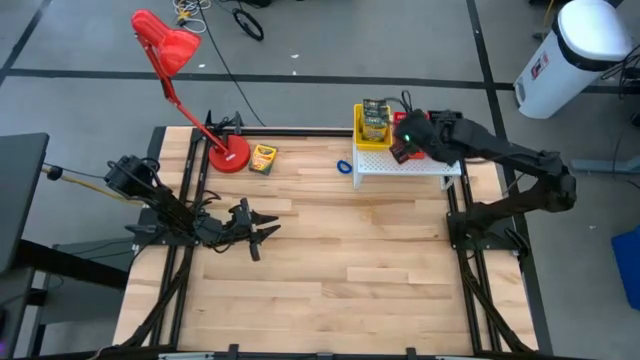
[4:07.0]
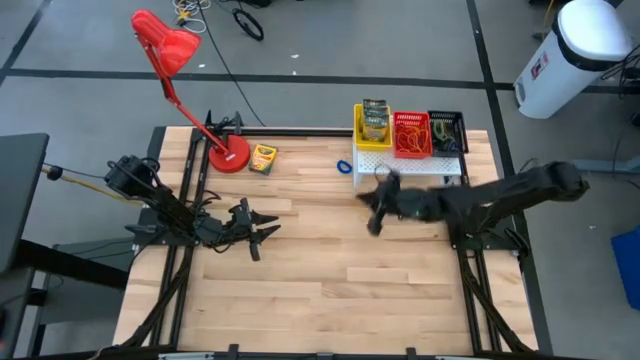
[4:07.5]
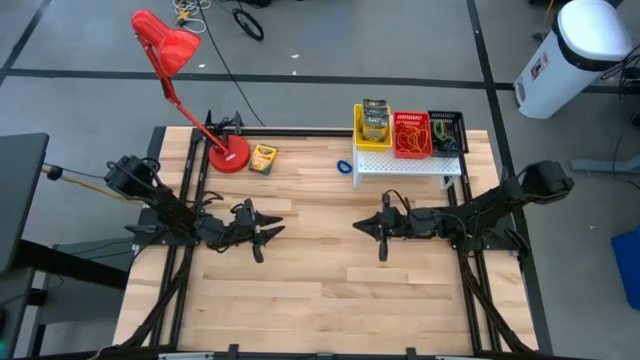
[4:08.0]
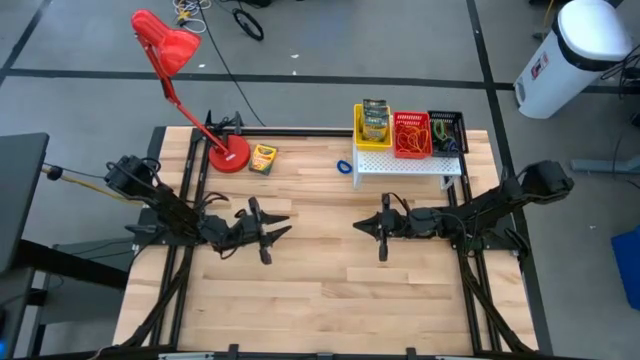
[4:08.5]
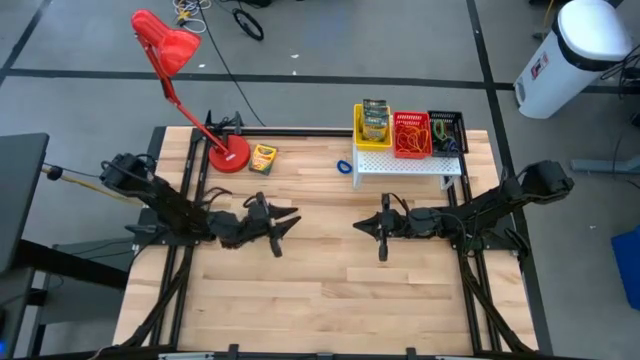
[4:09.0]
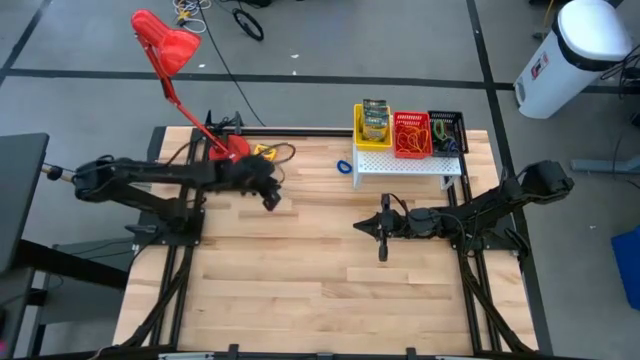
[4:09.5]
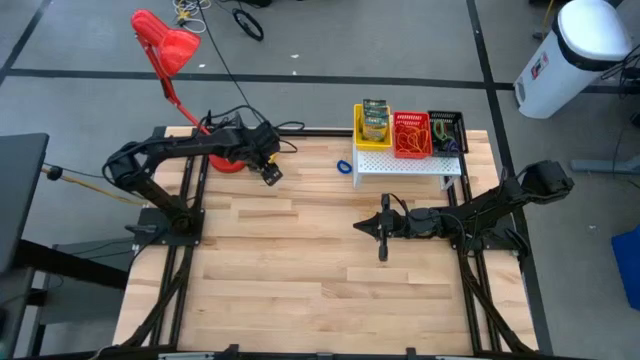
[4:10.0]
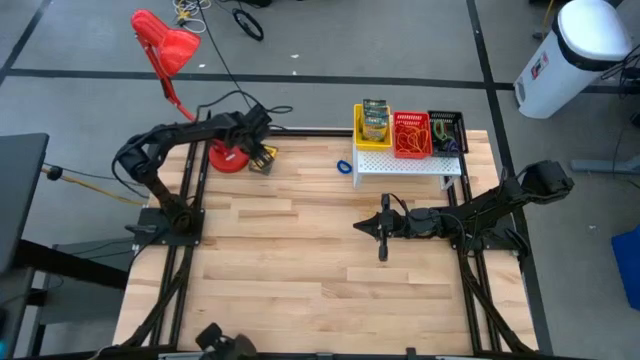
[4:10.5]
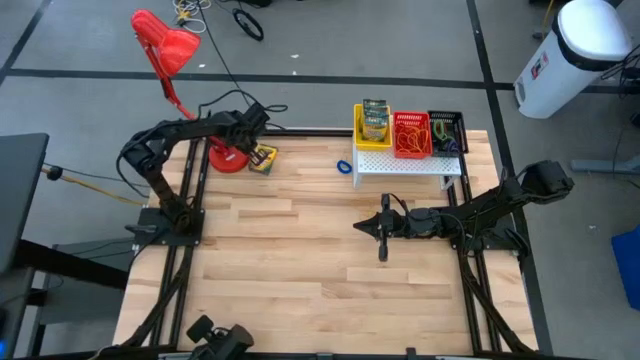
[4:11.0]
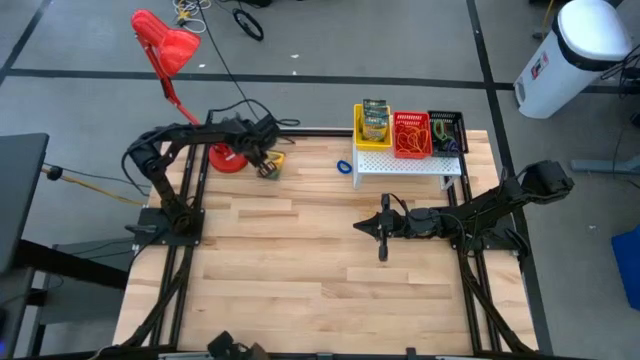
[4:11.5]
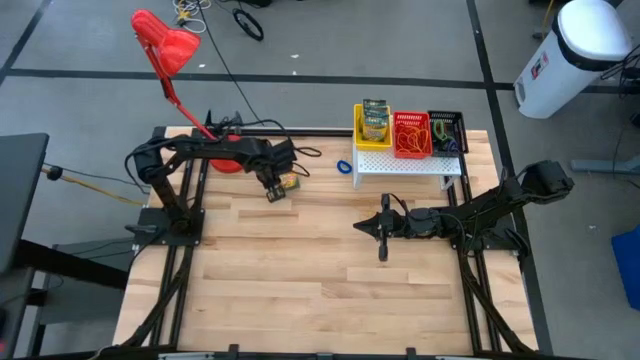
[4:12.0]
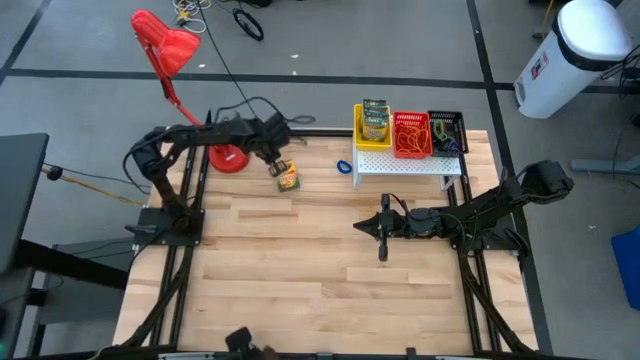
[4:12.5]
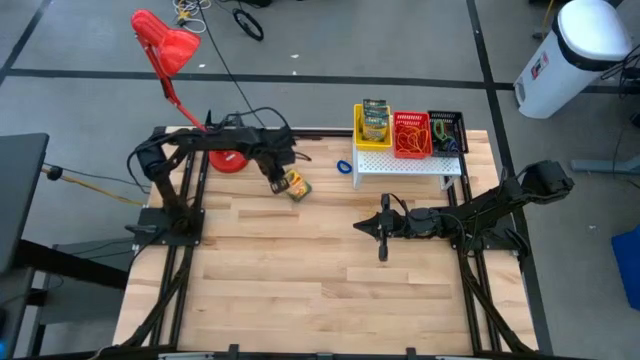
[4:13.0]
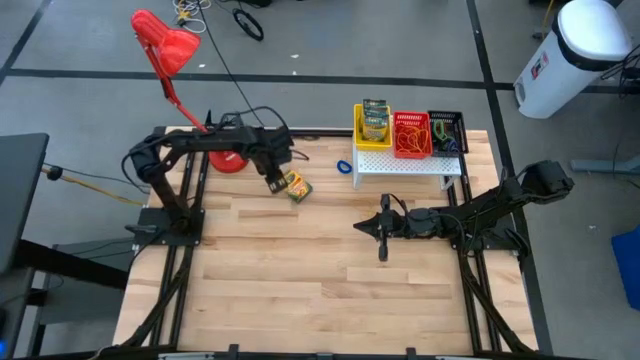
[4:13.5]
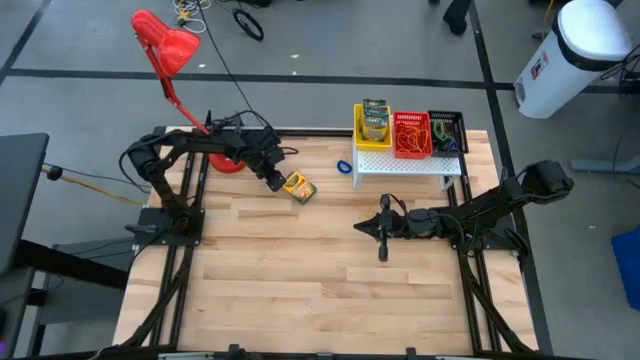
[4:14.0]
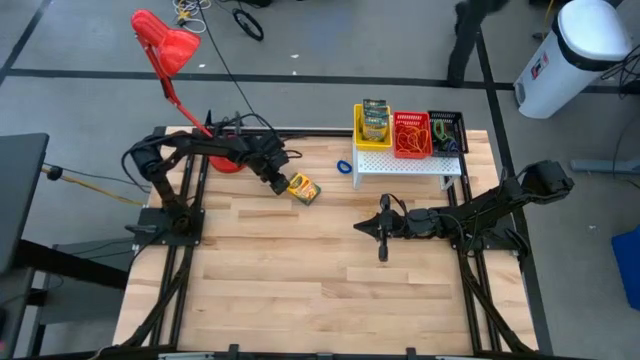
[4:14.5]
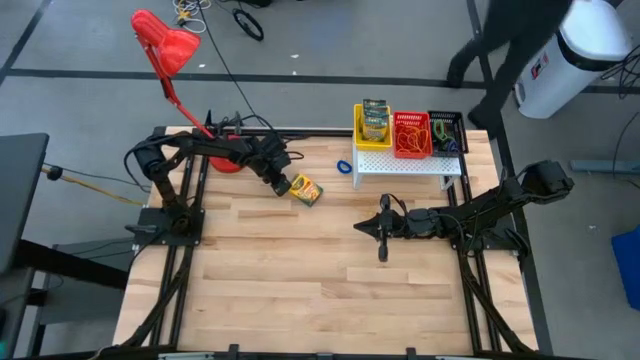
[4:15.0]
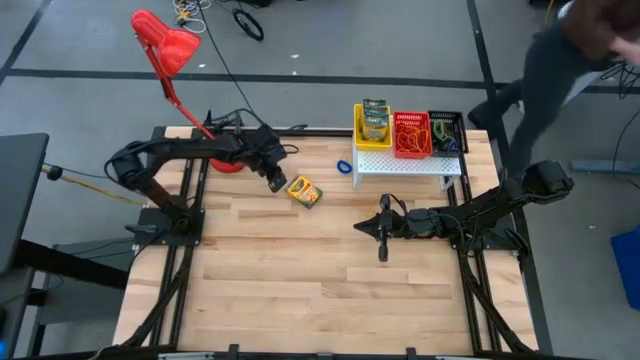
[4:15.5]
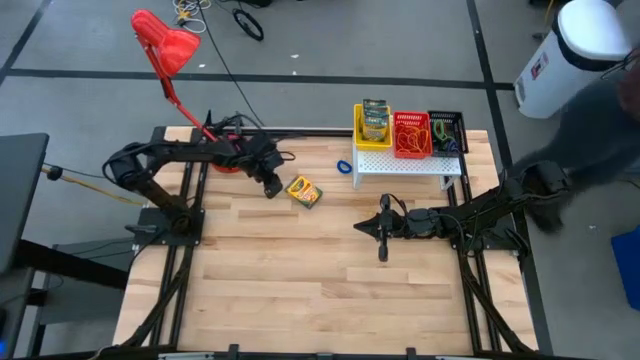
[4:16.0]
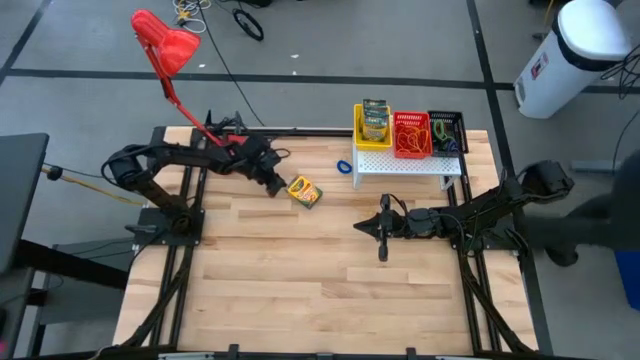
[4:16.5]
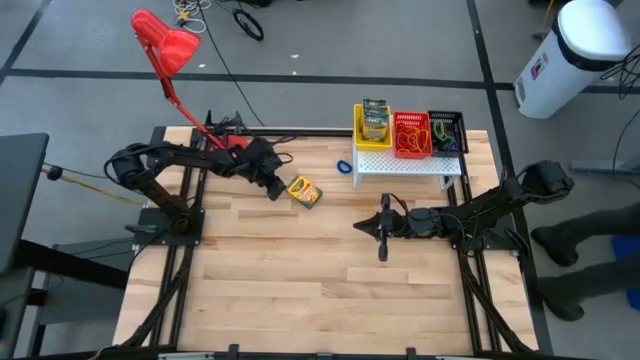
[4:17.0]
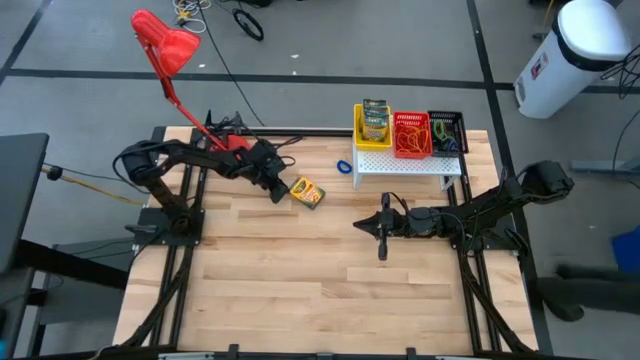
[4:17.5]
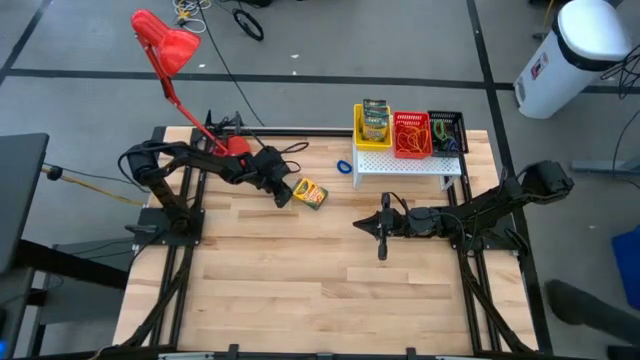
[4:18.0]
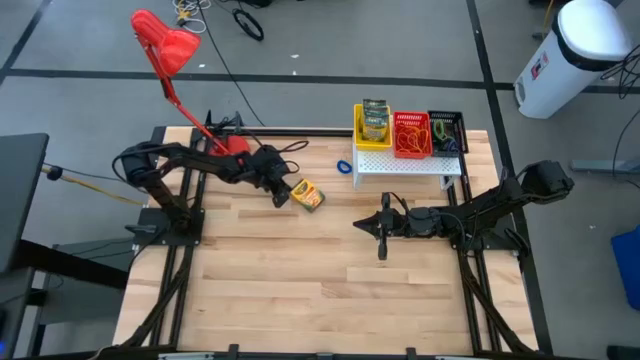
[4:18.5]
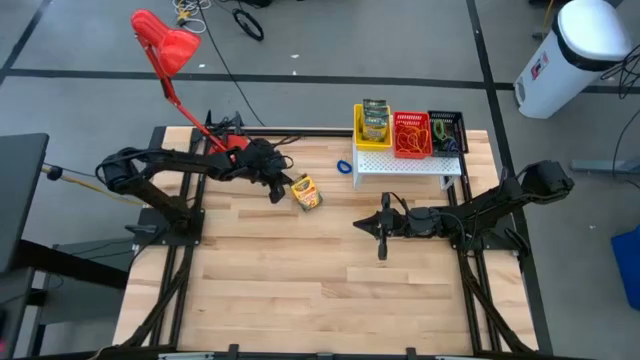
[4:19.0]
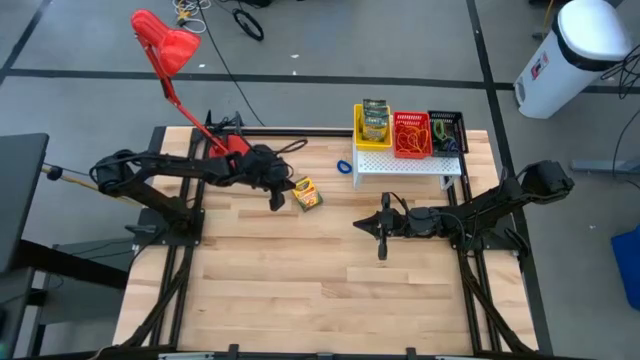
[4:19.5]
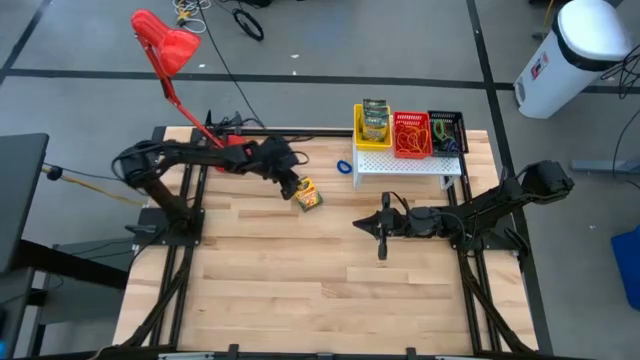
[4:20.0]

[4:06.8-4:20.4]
Task: Pick & Place Office Desk Supplies
Put the yellow crayon box on the yellow basket

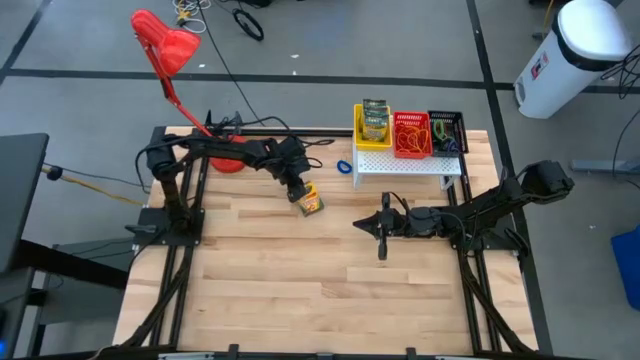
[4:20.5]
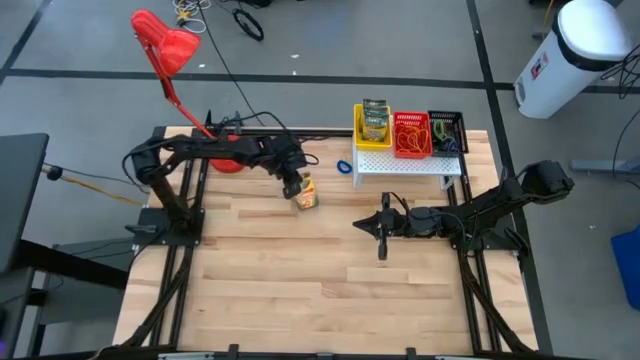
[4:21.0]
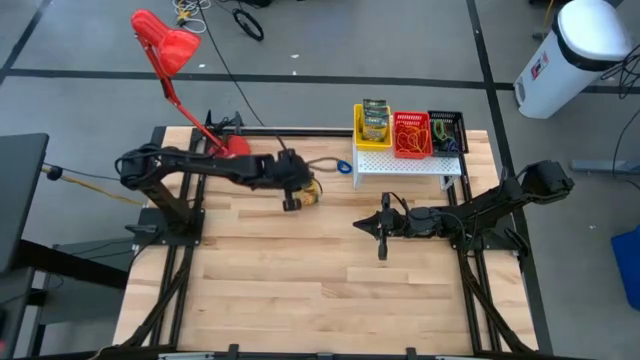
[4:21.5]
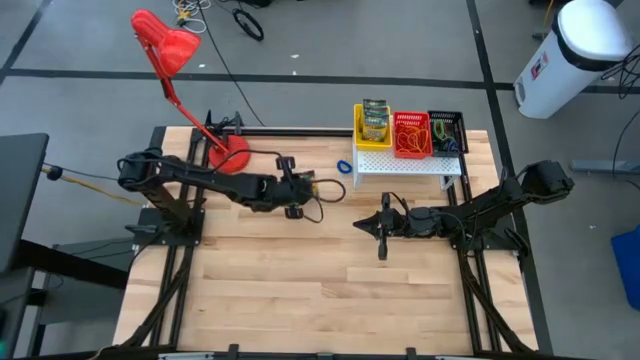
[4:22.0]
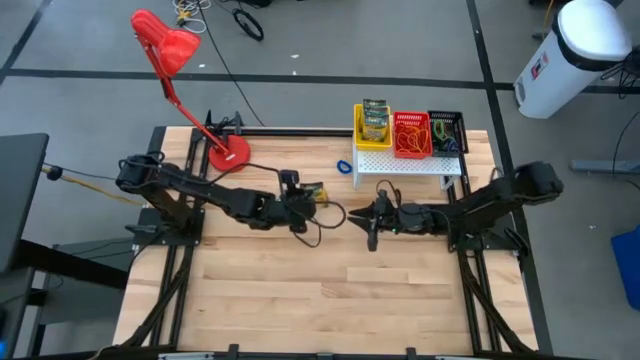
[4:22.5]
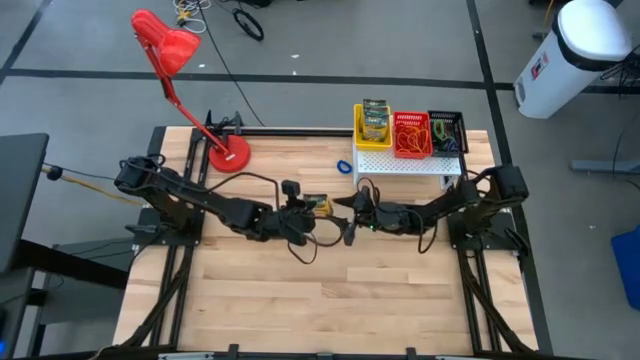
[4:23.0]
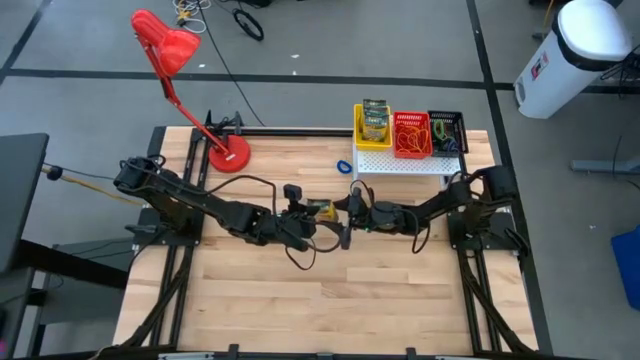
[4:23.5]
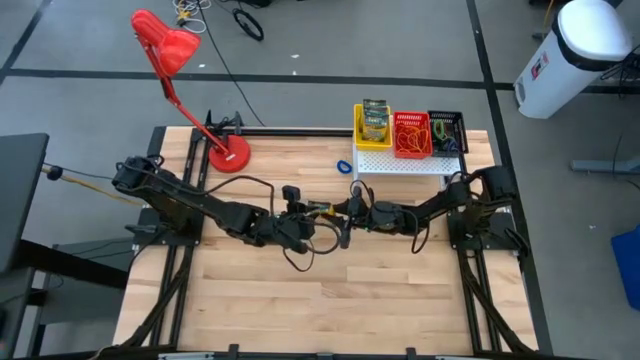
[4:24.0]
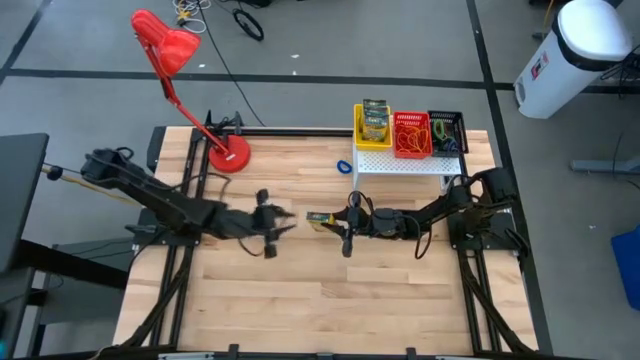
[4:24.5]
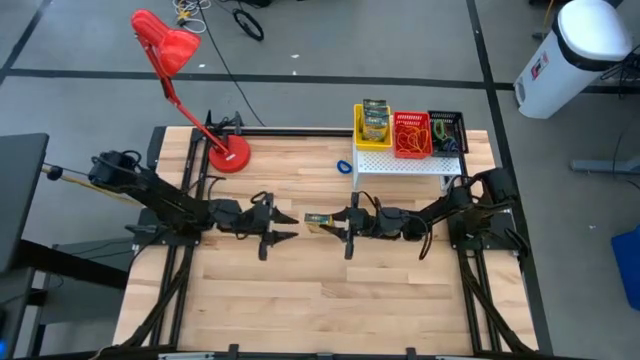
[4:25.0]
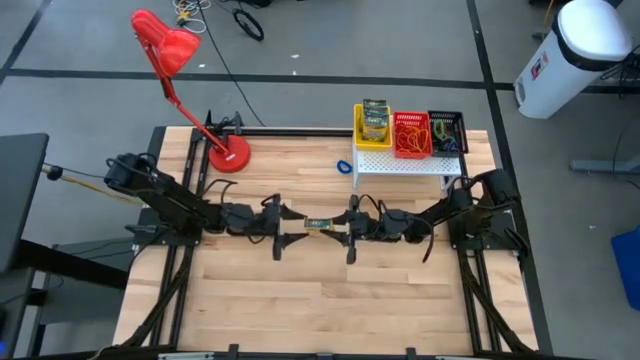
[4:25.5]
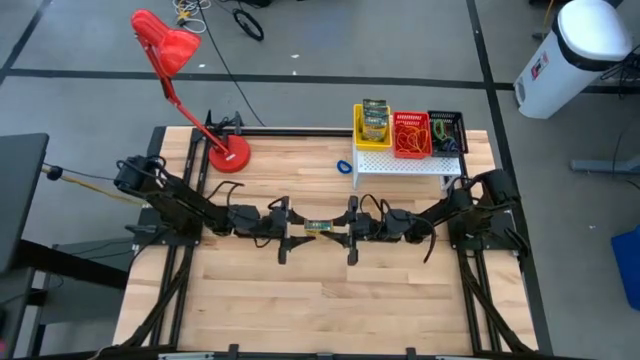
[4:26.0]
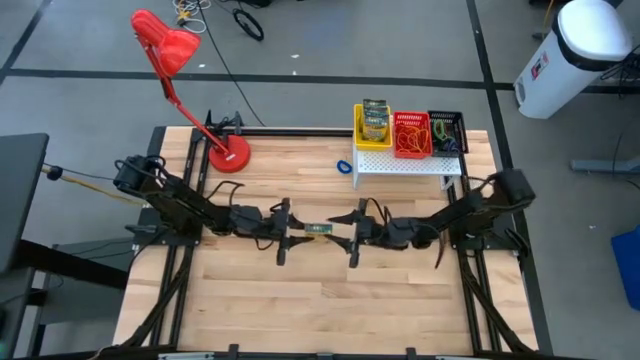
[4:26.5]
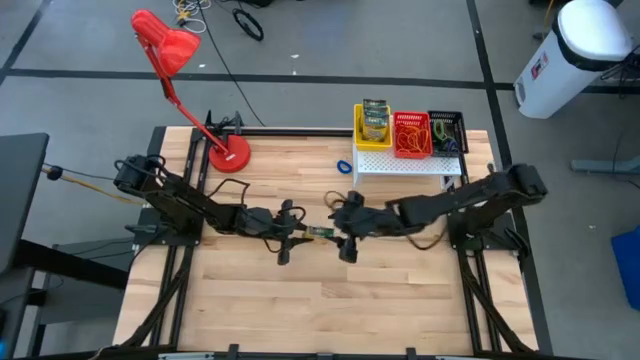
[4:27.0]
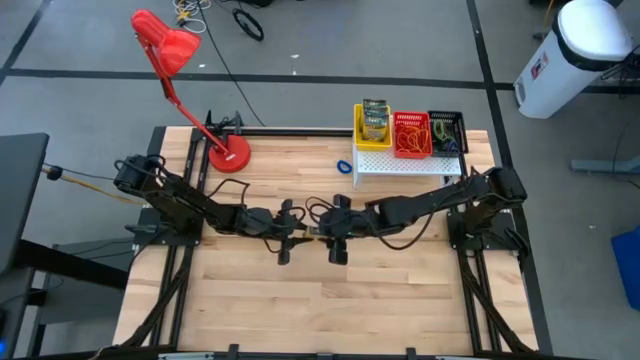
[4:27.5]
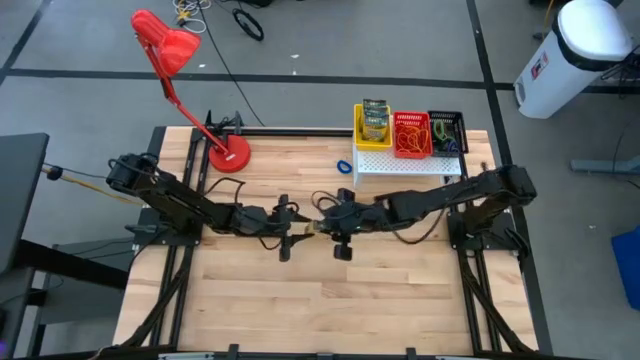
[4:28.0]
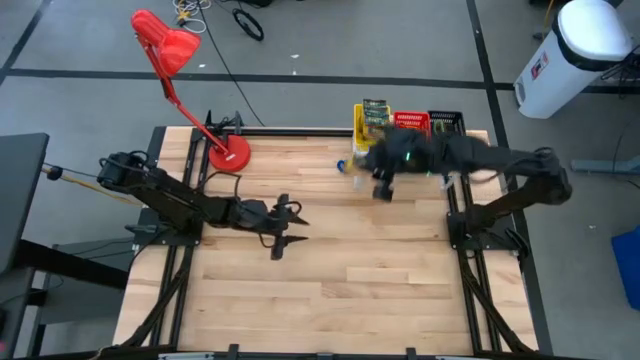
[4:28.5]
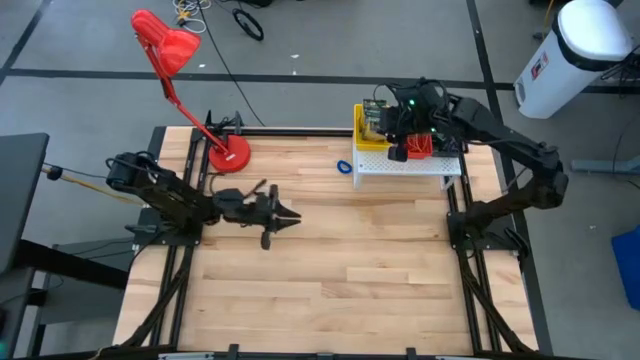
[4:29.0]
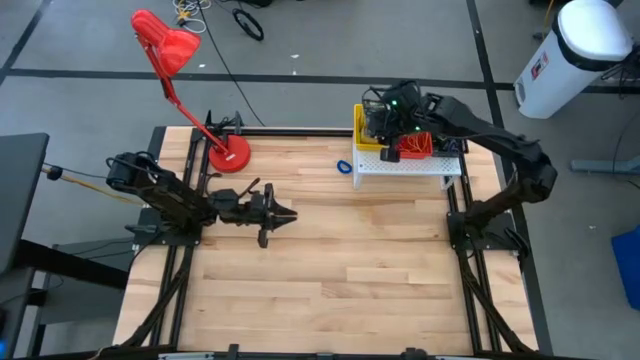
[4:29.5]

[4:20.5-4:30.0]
Put the yellow crayon box on the yellow basket
